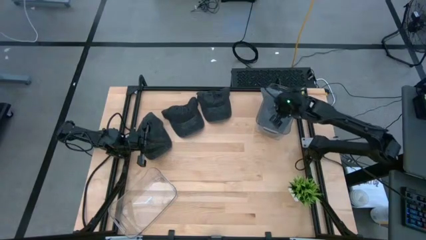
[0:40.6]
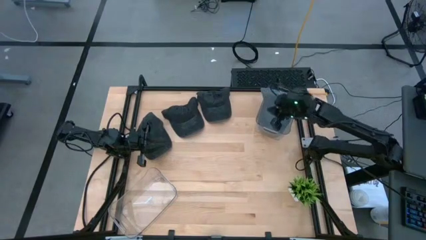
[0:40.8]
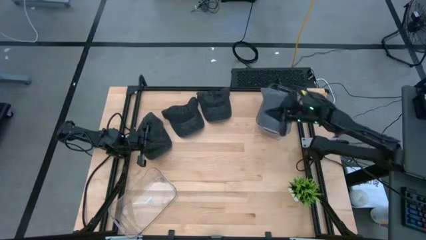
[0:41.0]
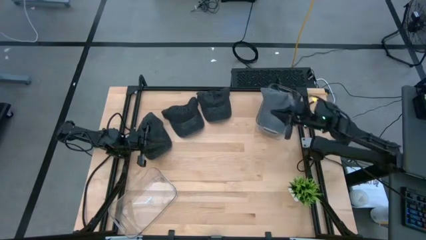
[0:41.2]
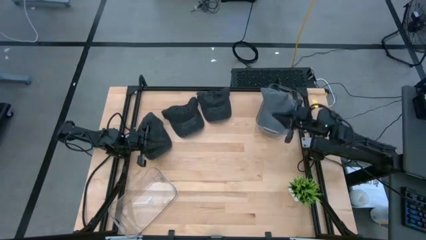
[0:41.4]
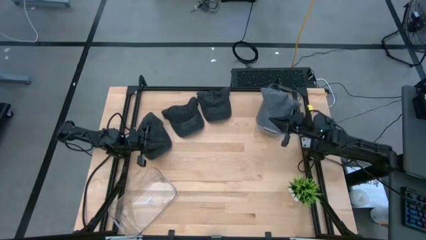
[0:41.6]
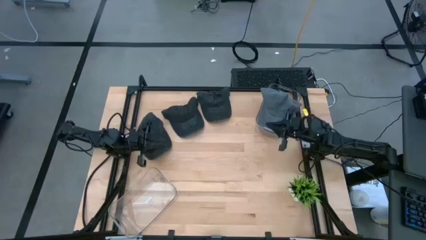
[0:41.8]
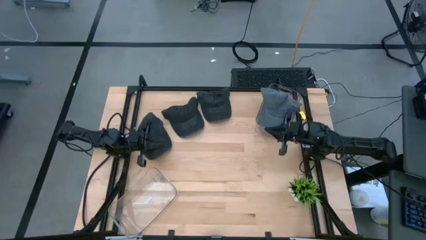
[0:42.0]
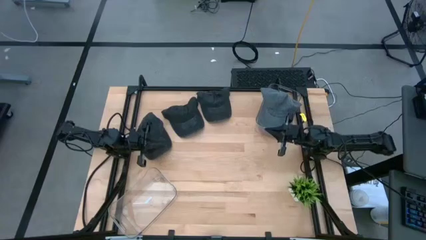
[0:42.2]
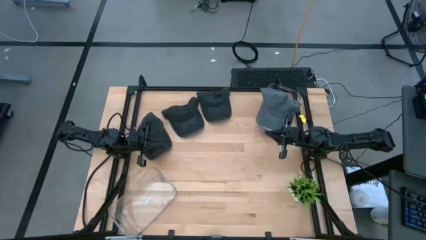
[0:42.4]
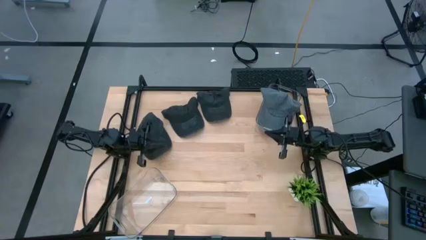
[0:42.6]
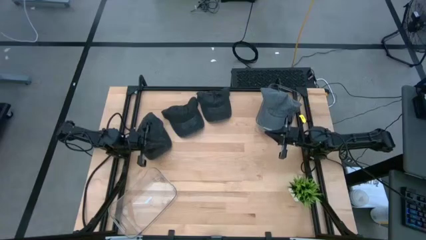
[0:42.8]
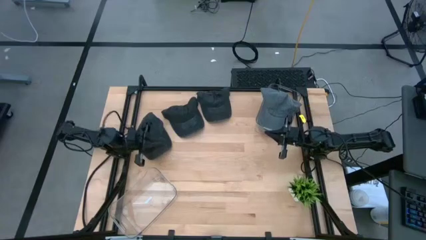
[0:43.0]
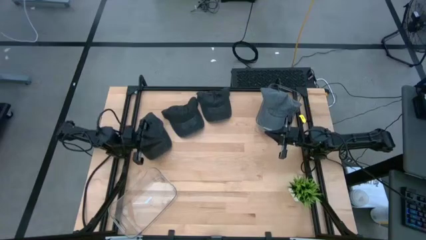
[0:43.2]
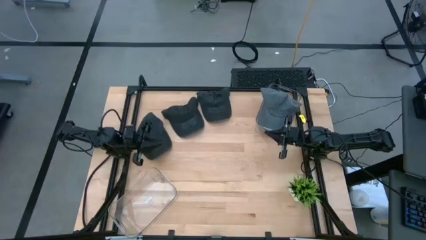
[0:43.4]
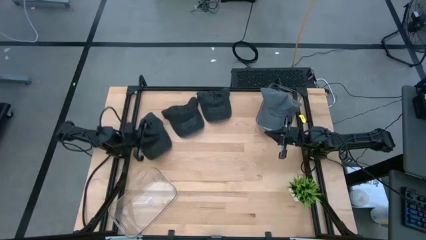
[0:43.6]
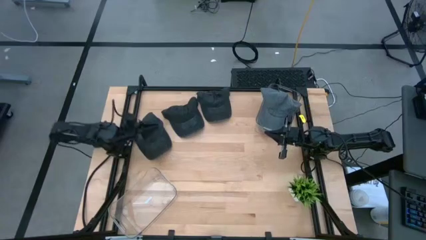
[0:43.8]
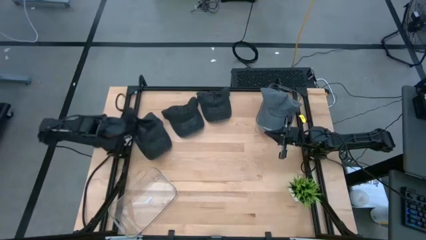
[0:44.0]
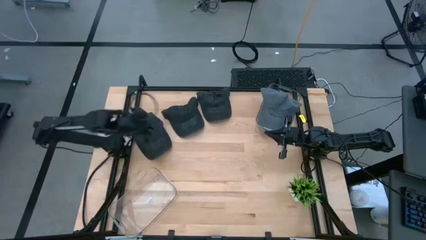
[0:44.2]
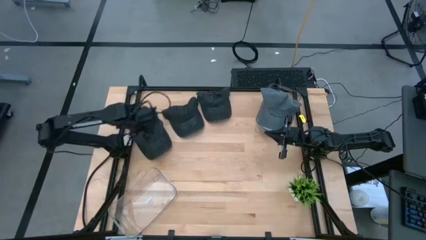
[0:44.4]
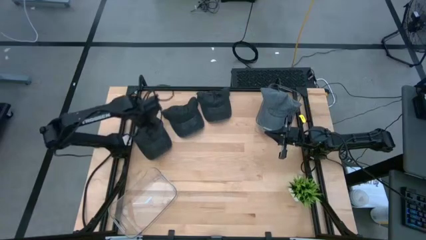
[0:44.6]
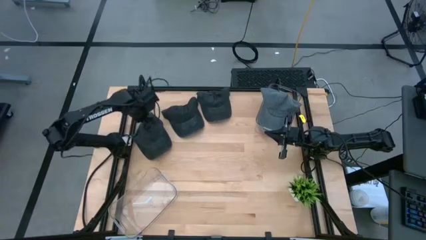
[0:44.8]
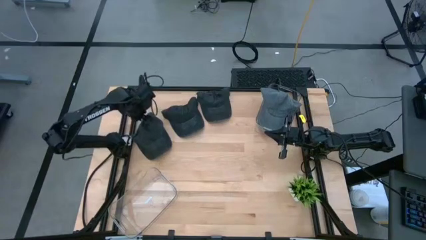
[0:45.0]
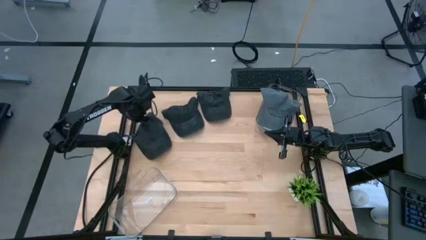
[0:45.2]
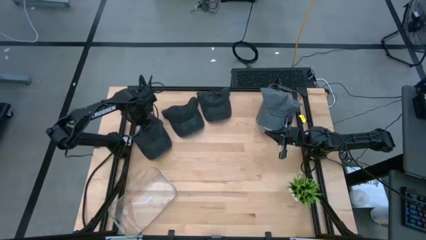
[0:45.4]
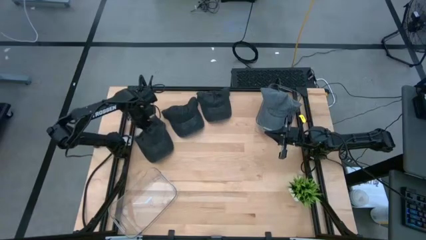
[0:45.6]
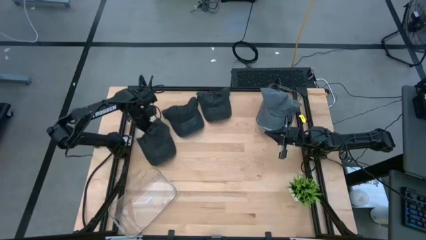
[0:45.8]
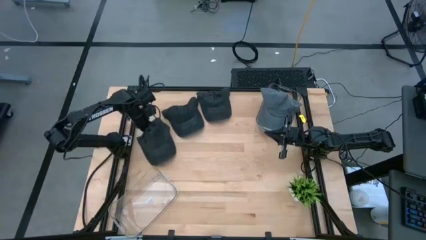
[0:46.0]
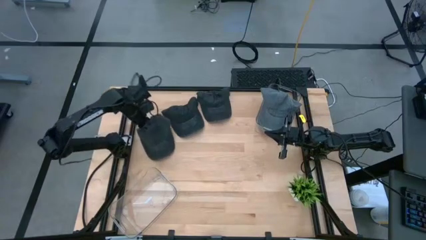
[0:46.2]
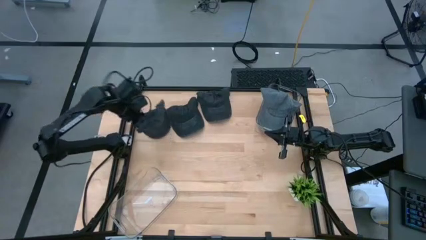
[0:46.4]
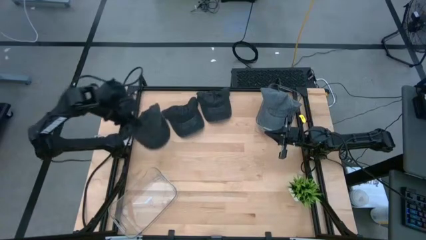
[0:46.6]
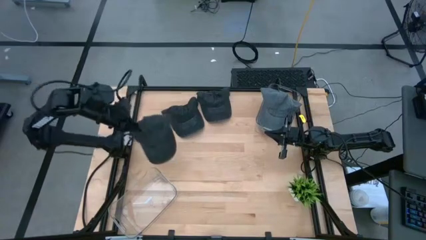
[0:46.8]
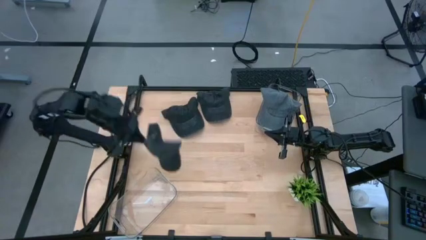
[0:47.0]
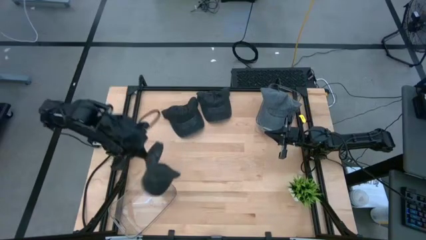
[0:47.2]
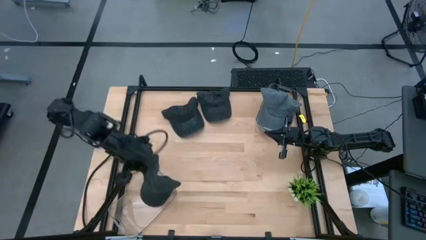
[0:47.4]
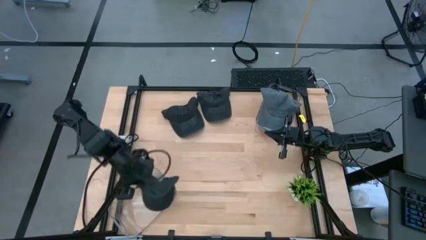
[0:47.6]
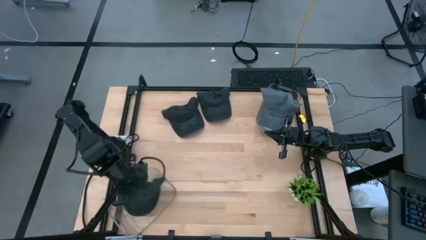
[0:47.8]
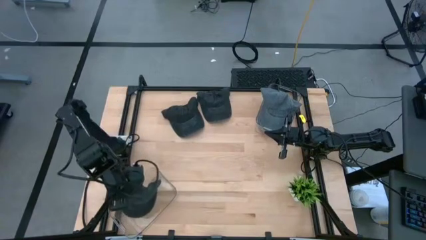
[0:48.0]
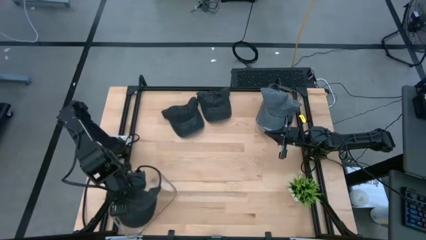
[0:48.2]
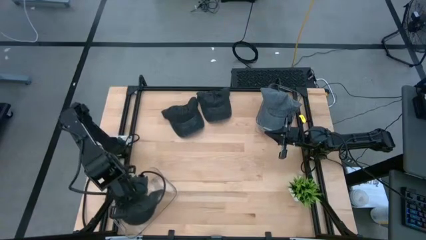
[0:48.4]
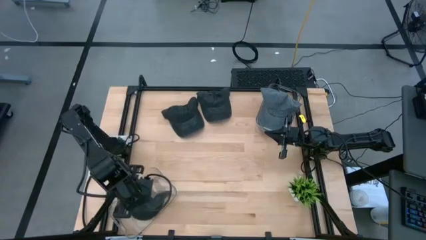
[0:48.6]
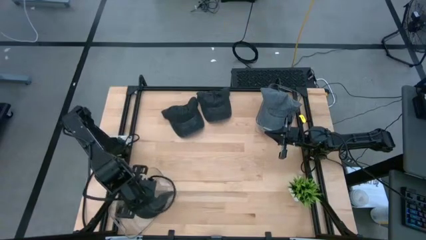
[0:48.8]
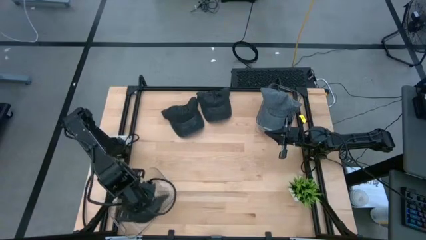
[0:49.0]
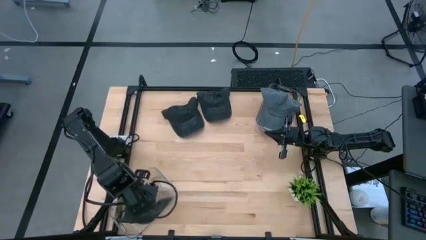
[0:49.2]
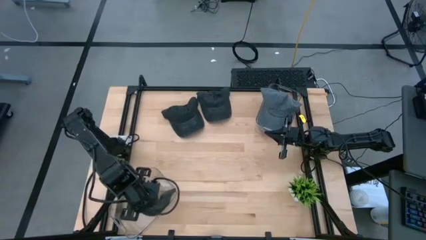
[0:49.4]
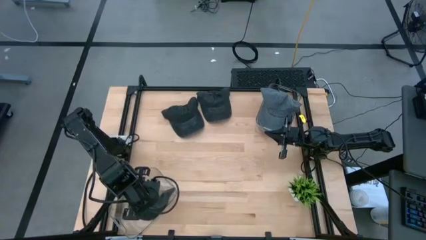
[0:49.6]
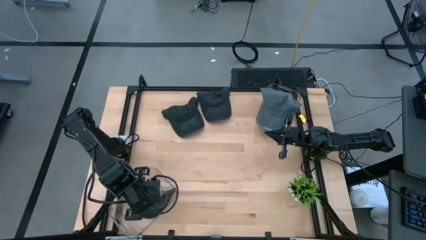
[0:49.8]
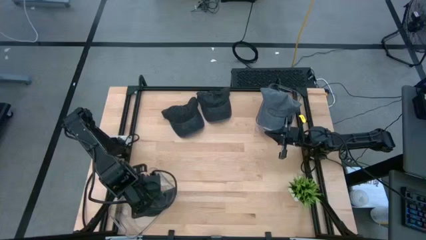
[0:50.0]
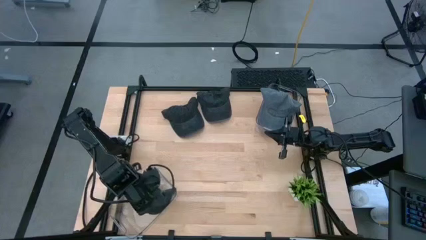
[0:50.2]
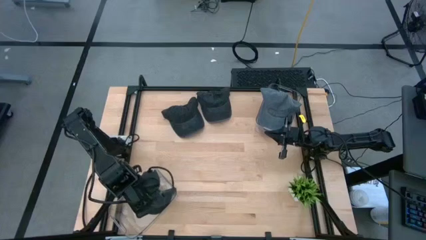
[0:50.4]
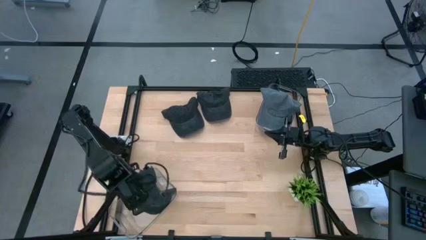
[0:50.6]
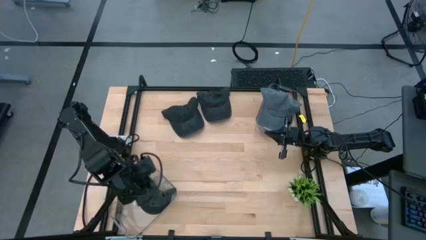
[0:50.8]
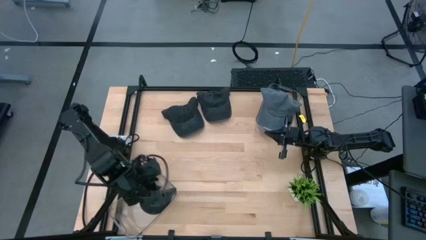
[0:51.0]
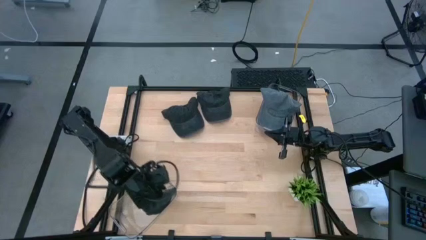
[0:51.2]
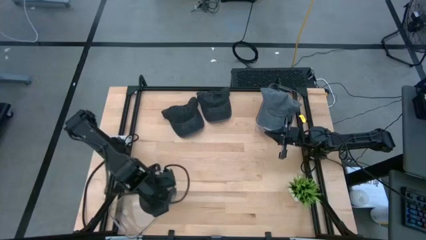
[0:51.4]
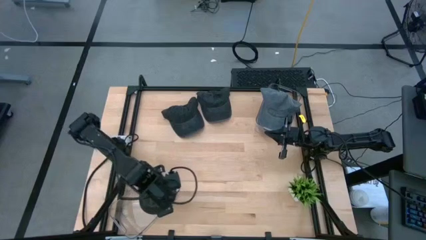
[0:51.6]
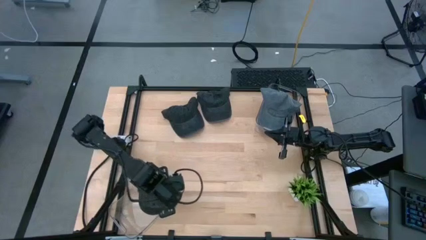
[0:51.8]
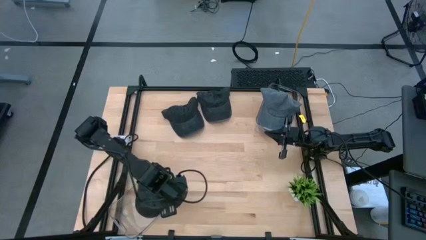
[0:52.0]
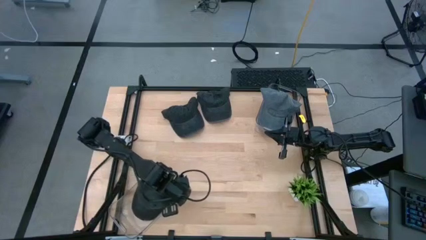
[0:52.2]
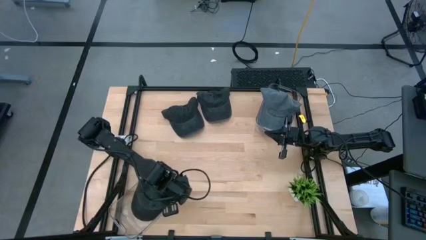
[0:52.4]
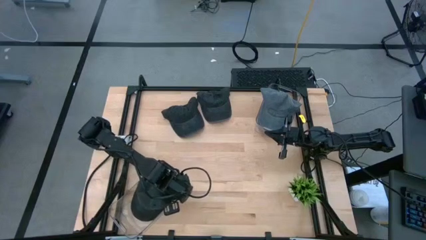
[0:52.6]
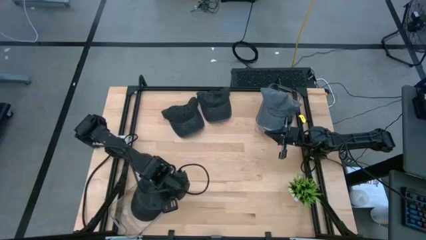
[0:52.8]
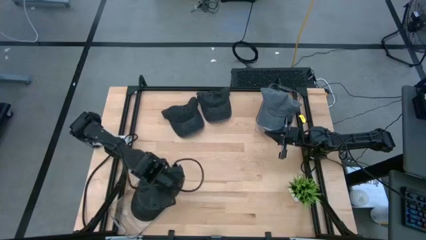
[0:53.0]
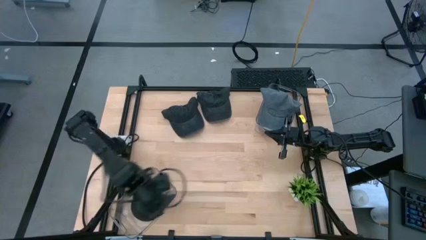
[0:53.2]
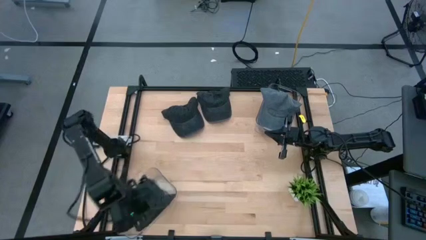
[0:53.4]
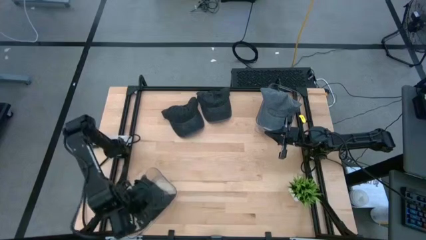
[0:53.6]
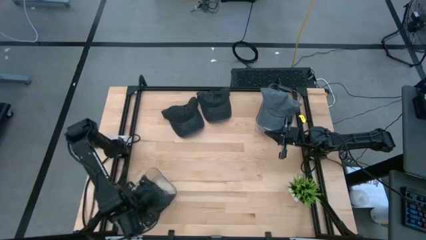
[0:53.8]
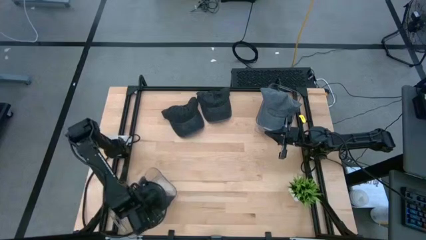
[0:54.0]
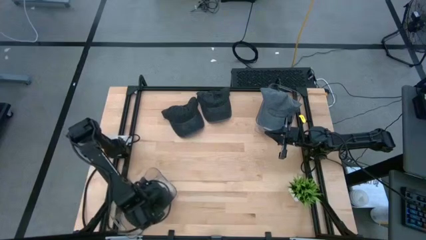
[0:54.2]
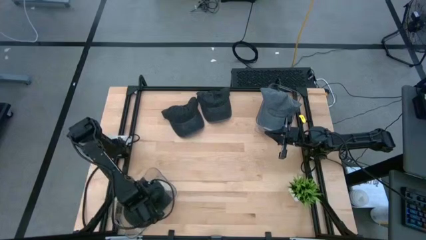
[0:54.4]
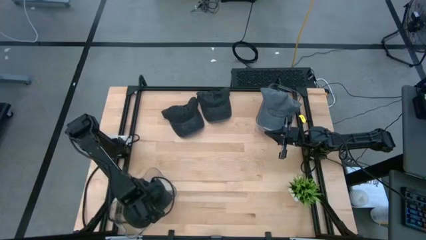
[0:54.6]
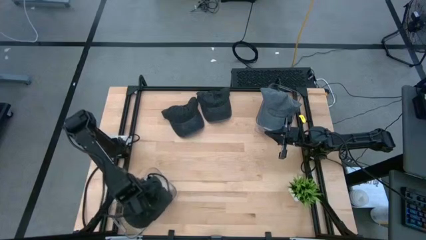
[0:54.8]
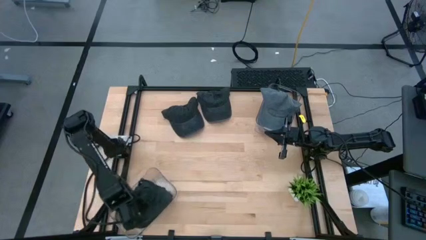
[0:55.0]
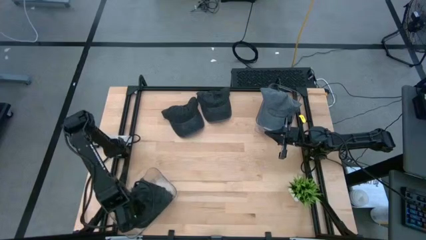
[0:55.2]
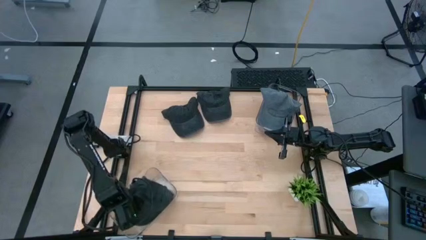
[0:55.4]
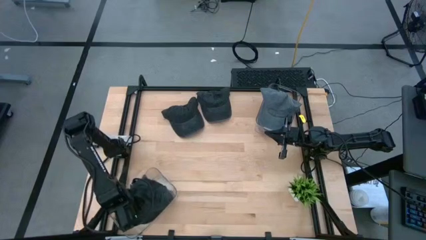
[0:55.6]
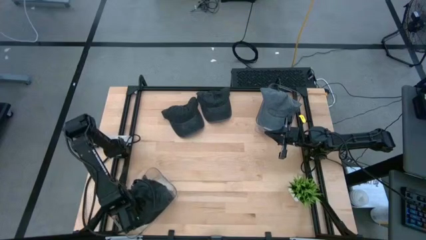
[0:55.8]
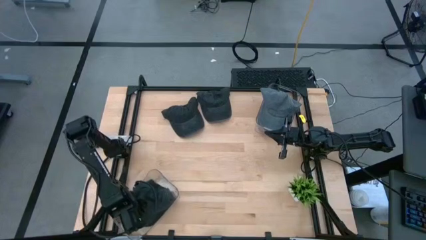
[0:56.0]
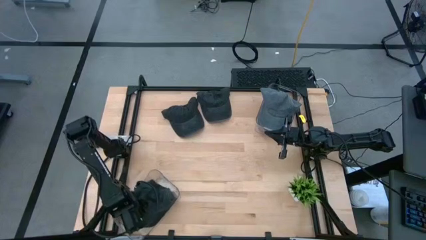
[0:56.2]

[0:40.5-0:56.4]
Task: Pick & Place hat
Put the bottom black cap into the bottom transparent bin
